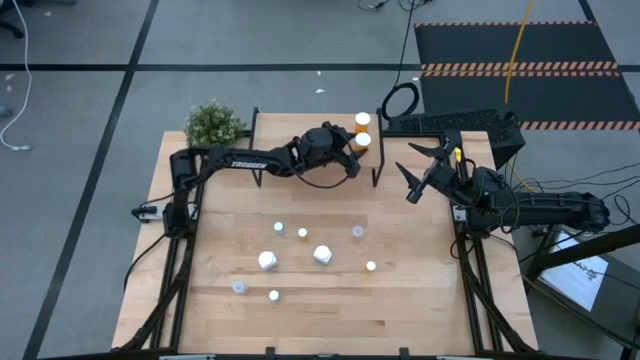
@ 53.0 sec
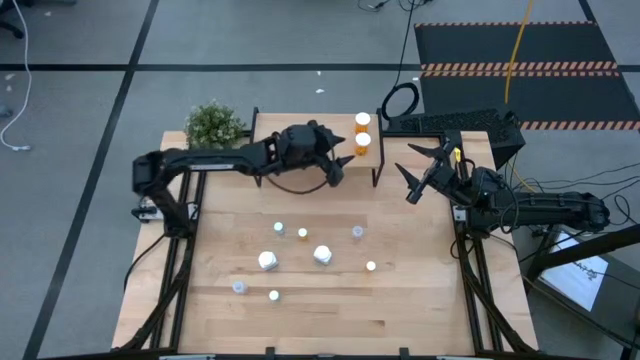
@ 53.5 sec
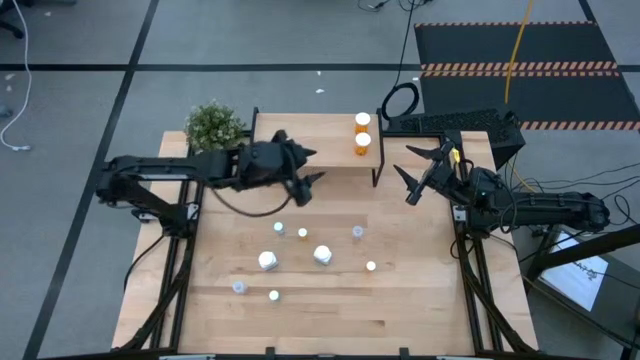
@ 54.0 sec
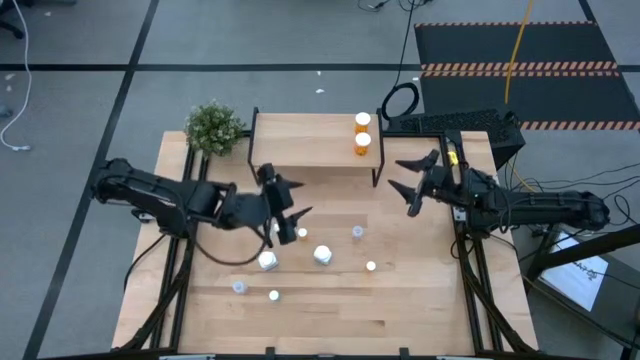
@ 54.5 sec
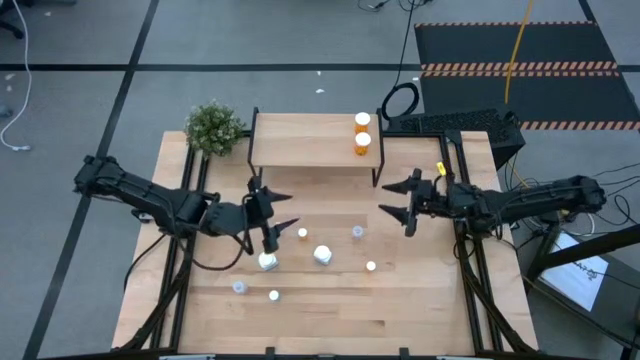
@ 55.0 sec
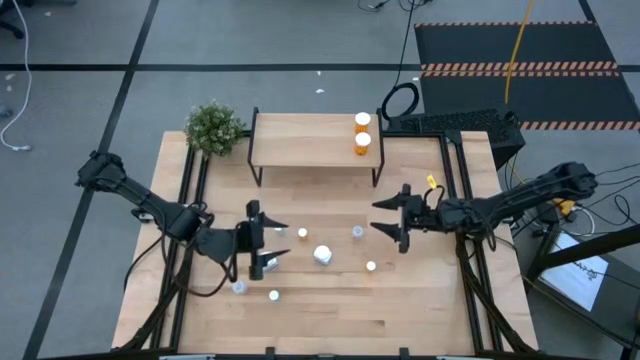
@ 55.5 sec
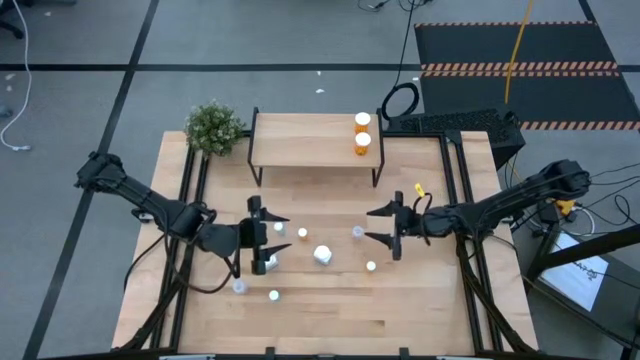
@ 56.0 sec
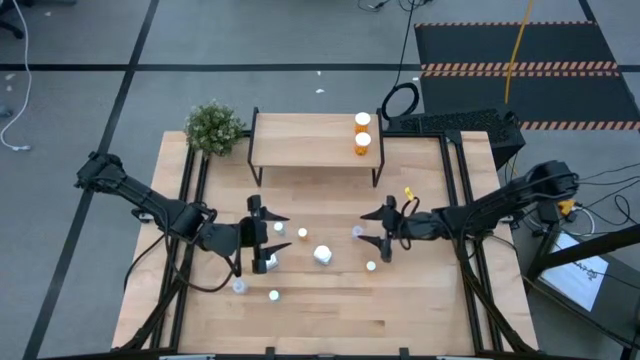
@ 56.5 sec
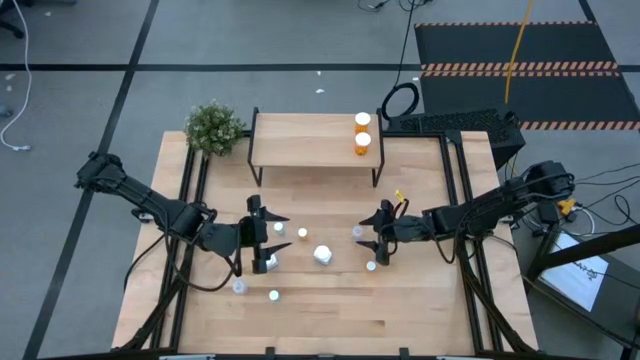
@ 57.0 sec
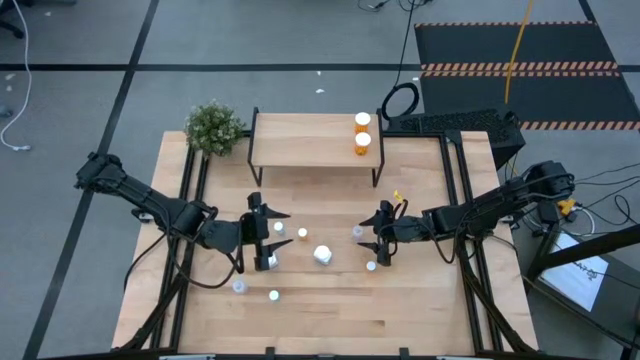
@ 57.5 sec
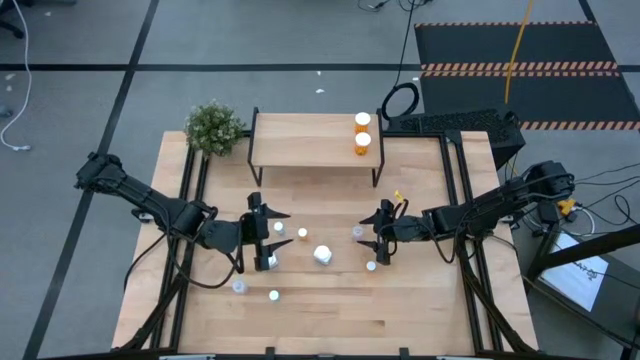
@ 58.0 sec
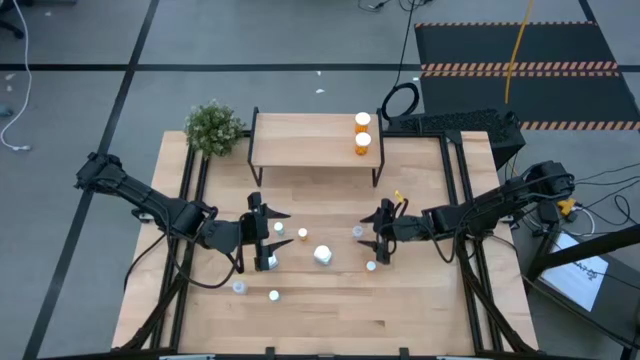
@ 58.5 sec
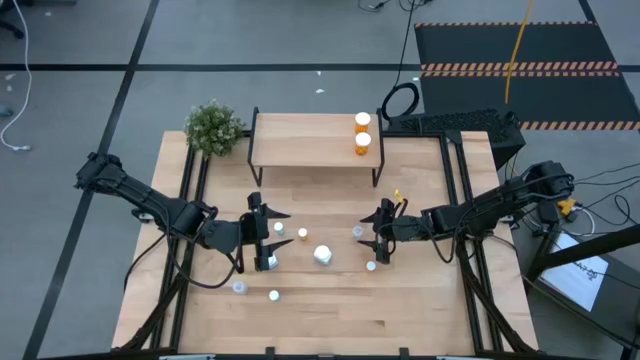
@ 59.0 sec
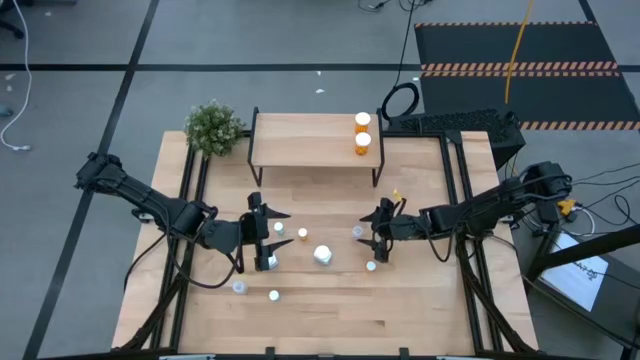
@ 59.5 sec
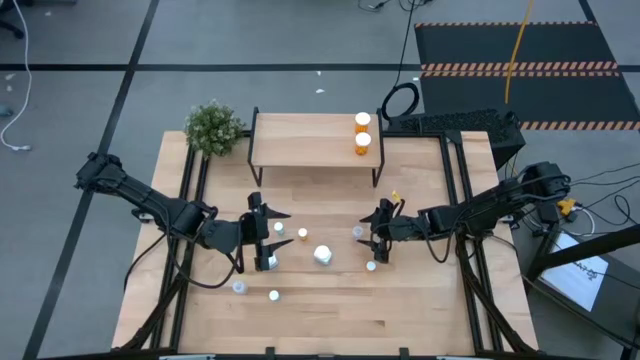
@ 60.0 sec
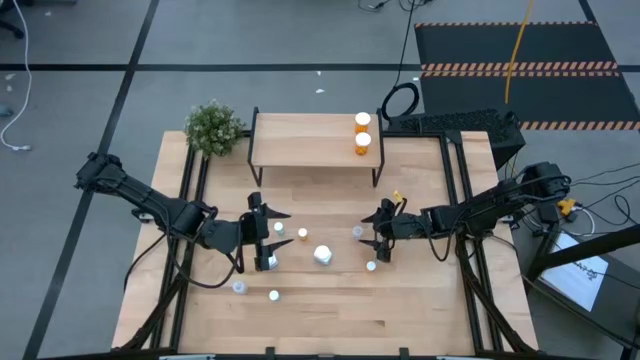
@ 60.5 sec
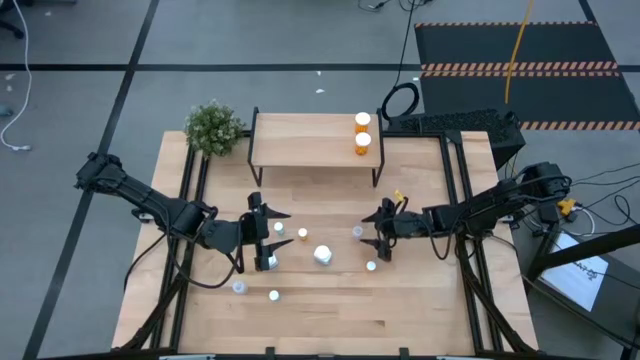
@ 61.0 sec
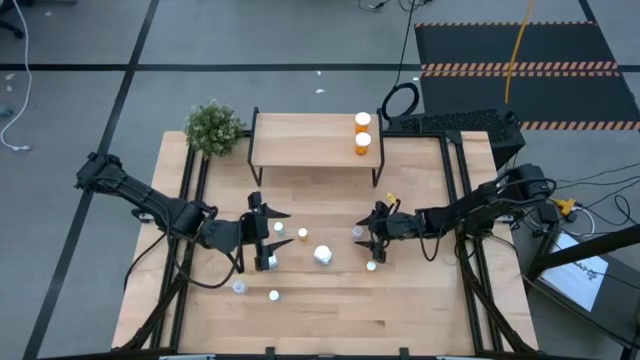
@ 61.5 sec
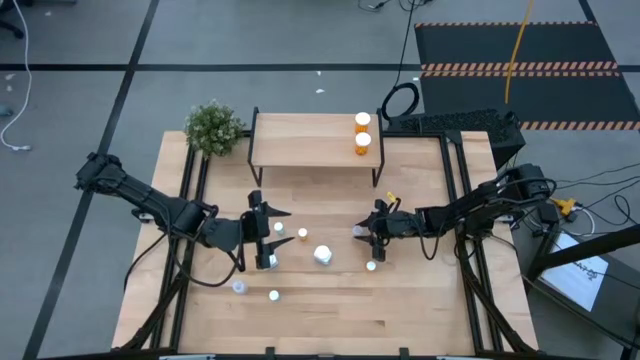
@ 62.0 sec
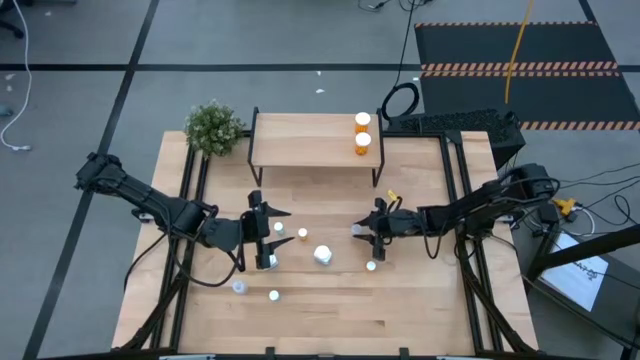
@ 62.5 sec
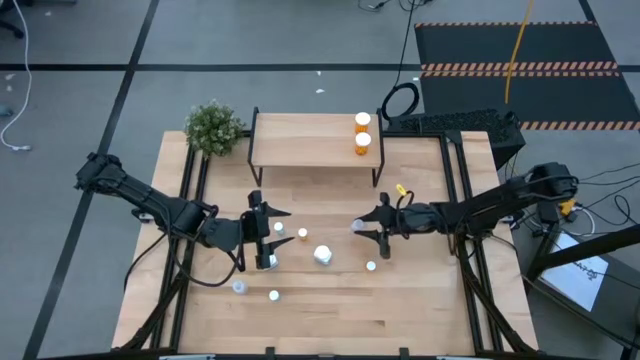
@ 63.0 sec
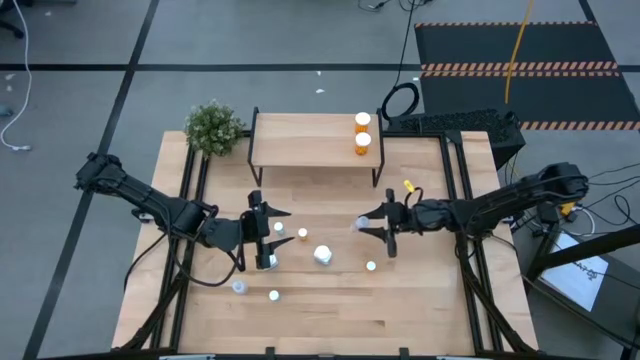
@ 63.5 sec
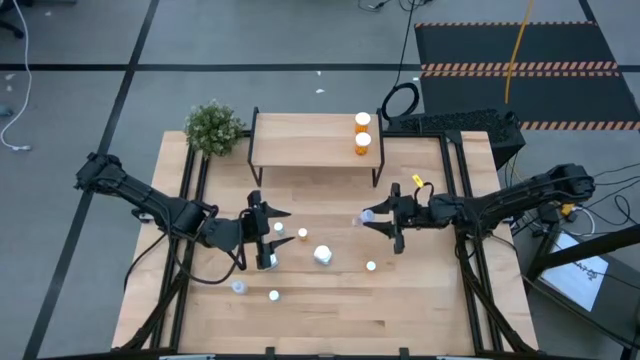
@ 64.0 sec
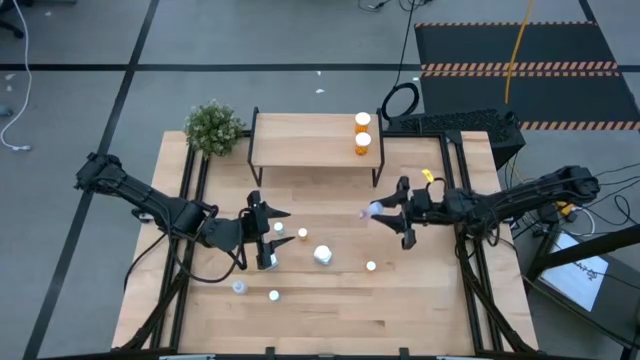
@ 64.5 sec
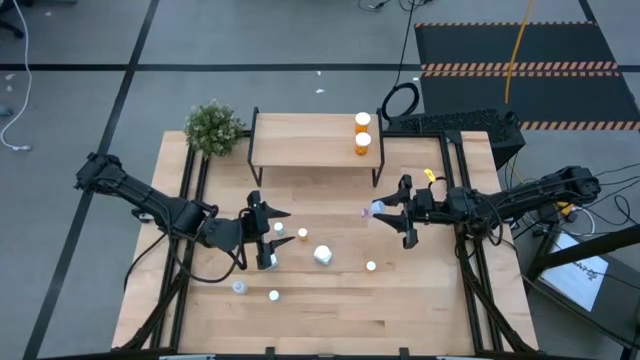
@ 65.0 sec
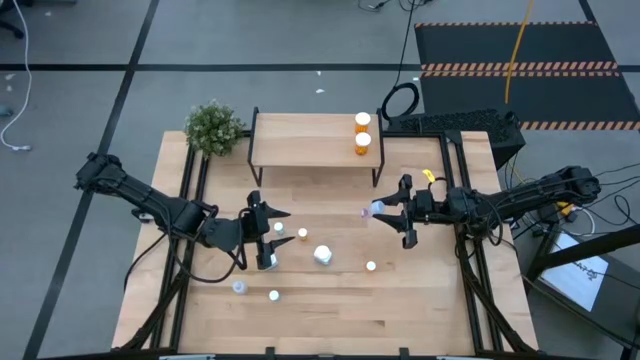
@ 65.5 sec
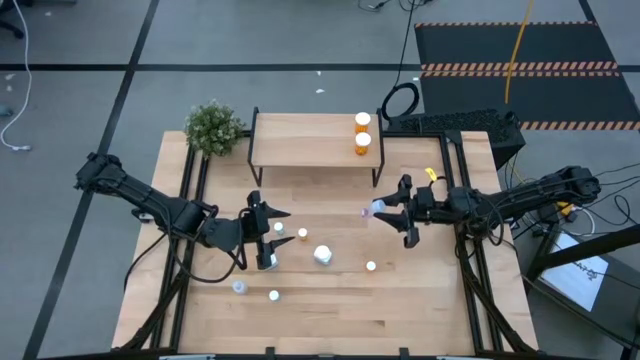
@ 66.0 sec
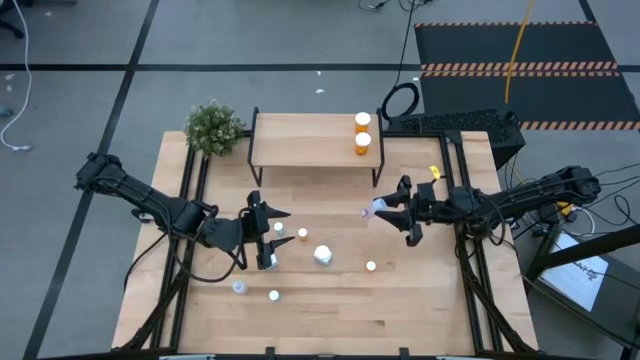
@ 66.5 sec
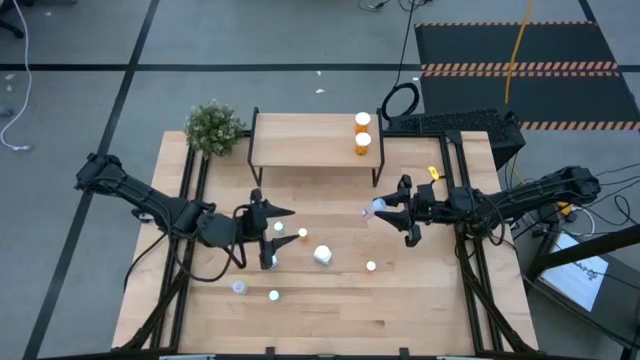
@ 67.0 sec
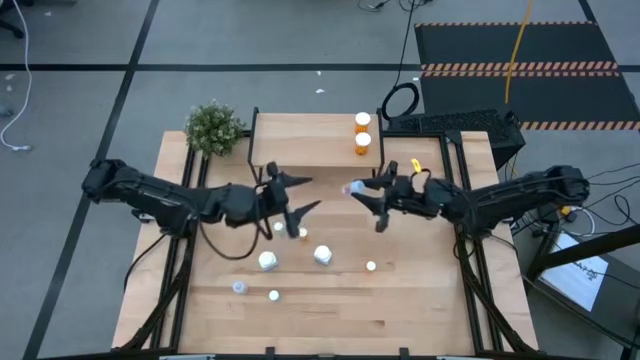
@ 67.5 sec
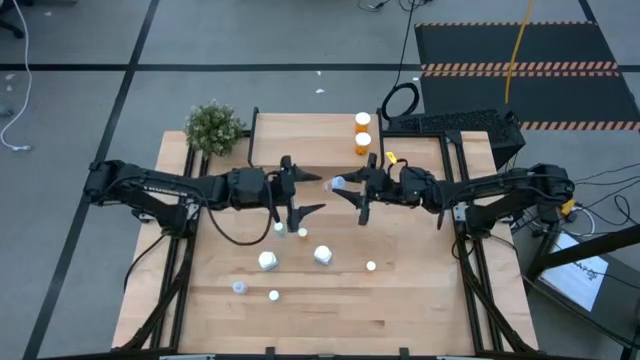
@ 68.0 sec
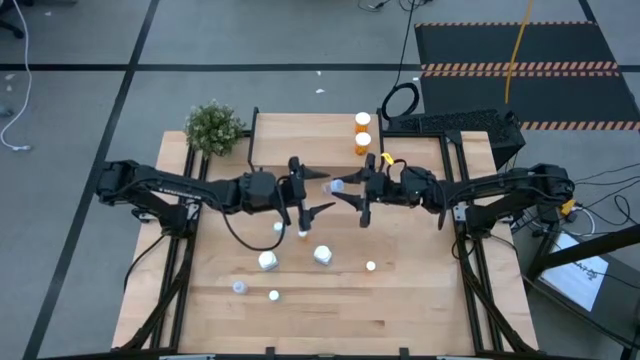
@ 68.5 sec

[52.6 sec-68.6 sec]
Task: Pick and place medicine bottles onto shelf by color
Put the top transparent pill bottle on the shelf

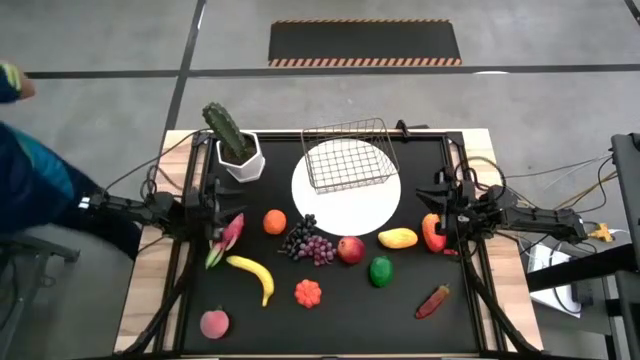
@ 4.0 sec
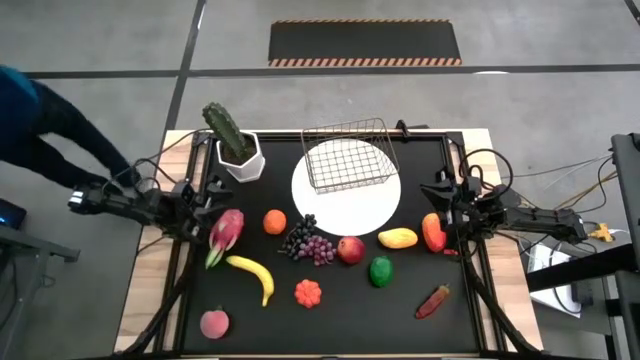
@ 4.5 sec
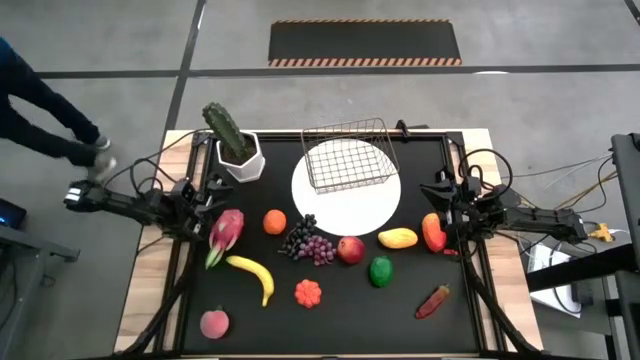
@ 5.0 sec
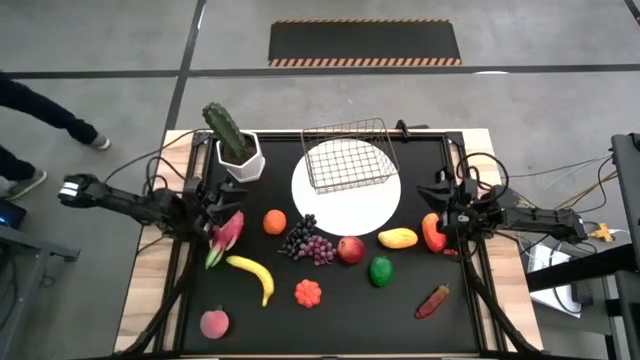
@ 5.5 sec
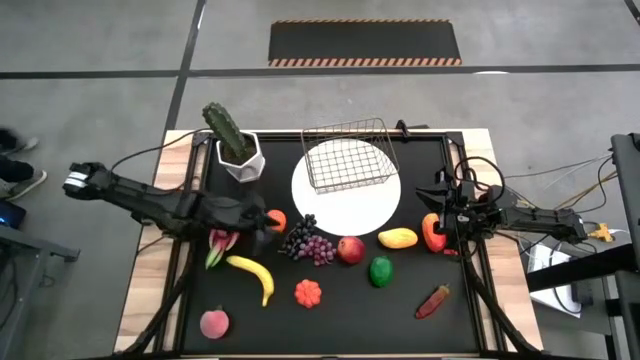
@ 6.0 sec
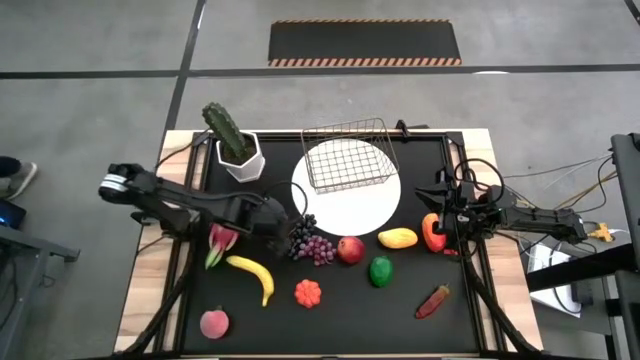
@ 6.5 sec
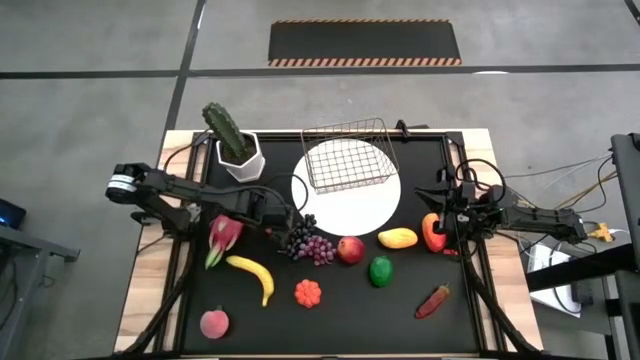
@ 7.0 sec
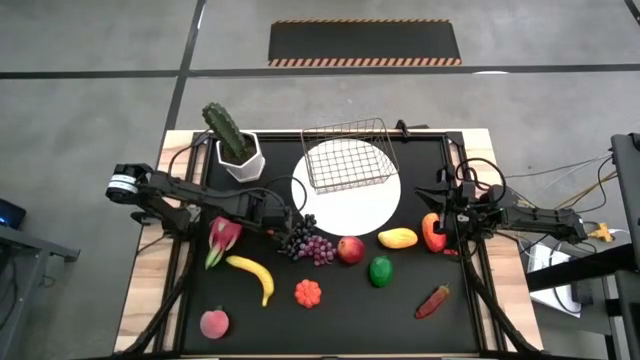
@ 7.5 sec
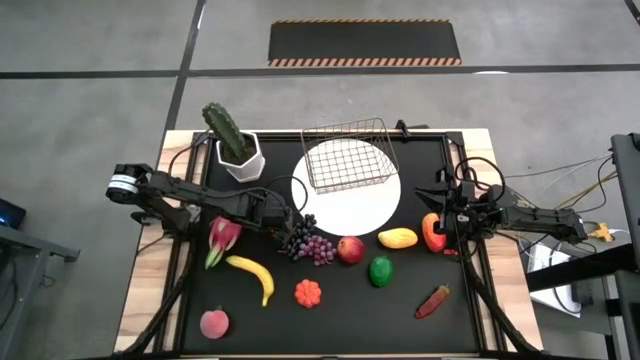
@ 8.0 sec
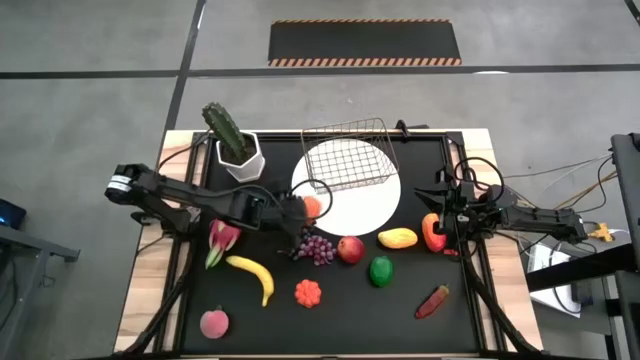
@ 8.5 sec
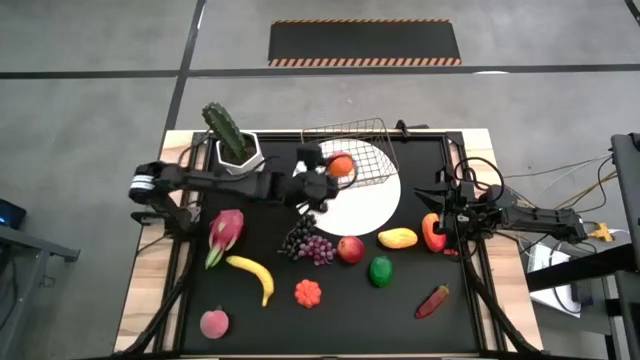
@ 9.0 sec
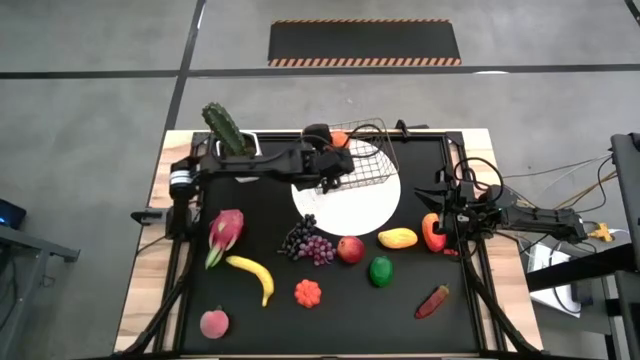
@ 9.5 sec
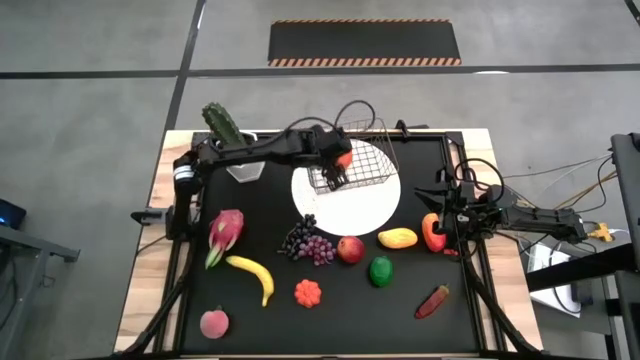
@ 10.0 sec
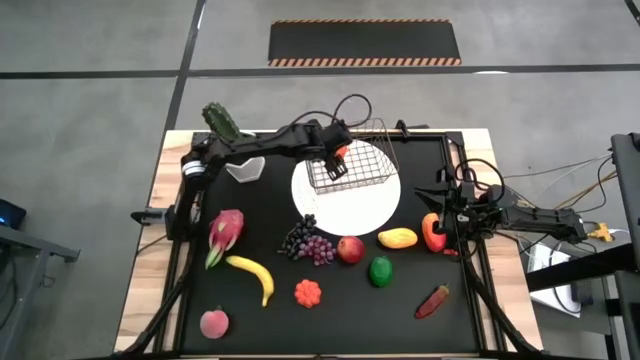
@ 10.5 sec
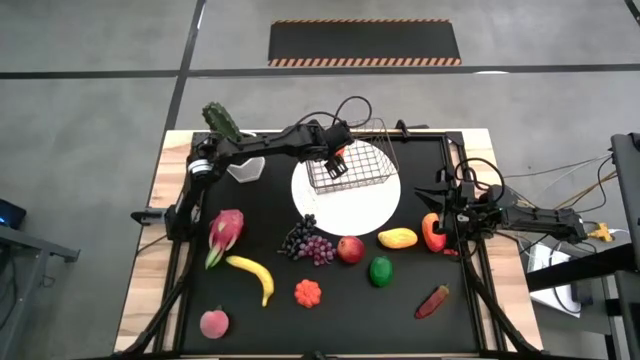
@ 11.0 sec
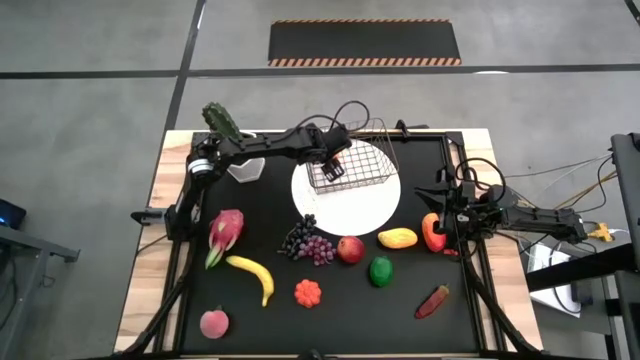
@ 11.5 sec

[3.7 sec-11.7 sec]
Task: Build produce basket
Put the orange into the wire basket
